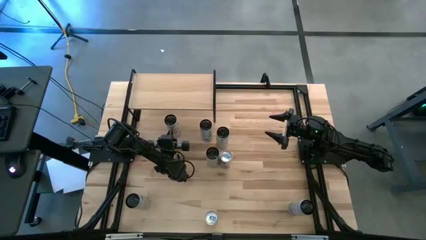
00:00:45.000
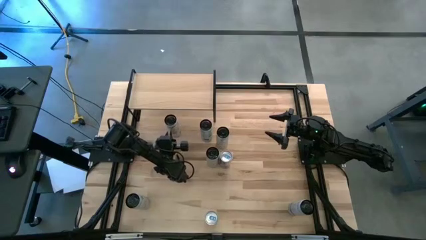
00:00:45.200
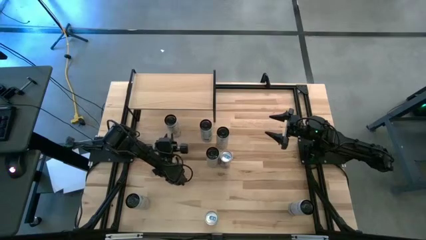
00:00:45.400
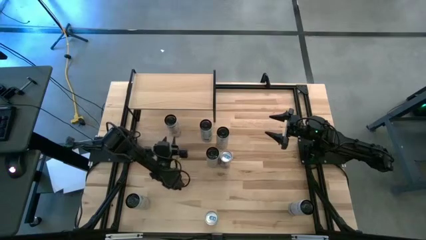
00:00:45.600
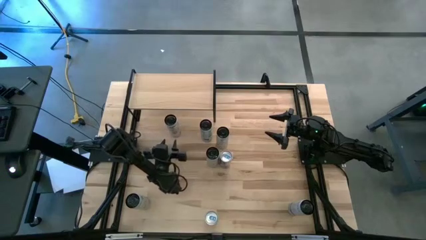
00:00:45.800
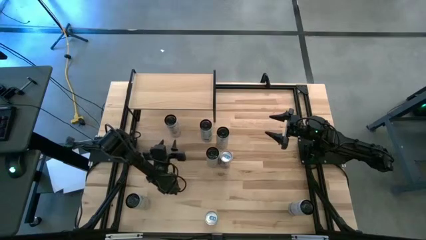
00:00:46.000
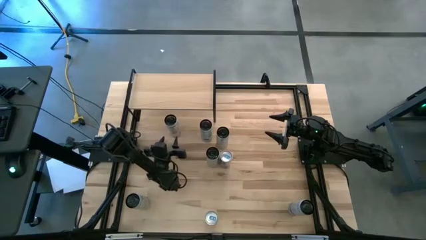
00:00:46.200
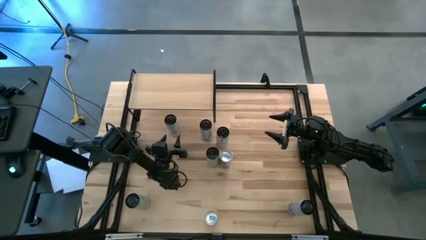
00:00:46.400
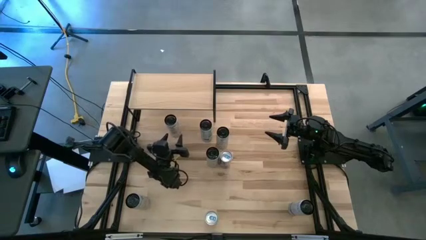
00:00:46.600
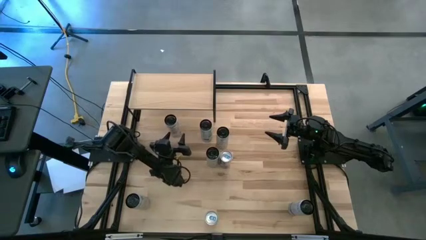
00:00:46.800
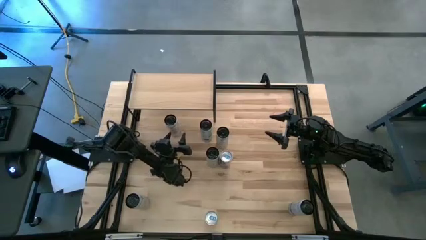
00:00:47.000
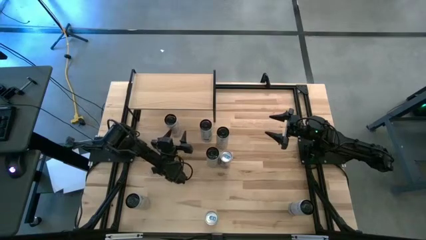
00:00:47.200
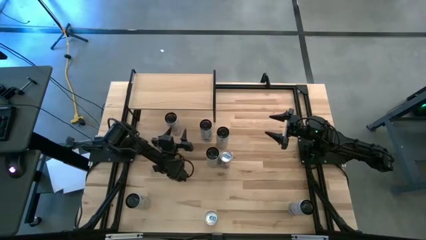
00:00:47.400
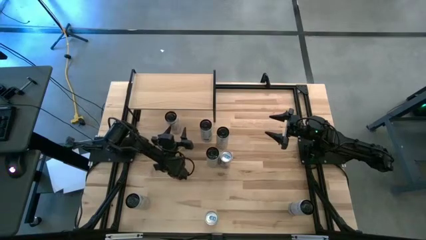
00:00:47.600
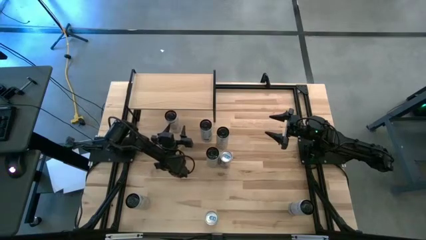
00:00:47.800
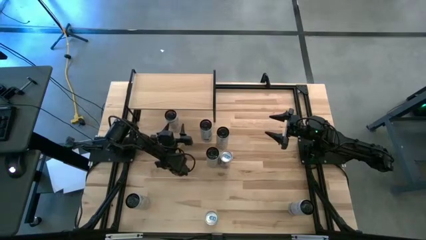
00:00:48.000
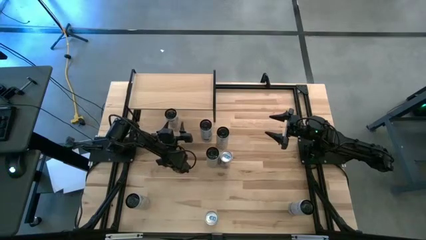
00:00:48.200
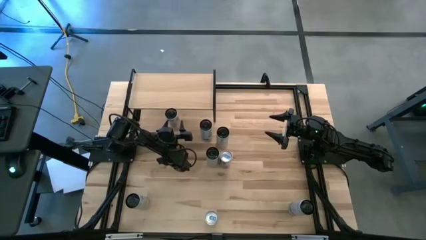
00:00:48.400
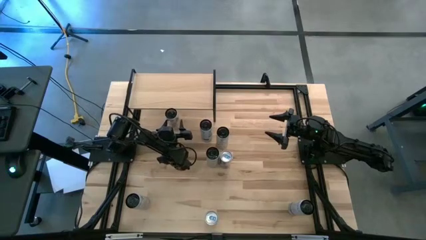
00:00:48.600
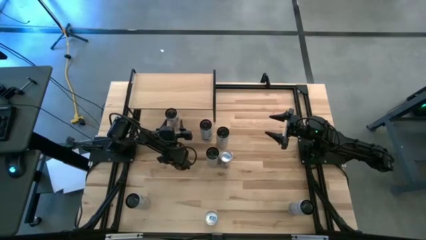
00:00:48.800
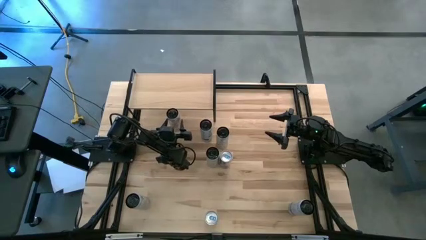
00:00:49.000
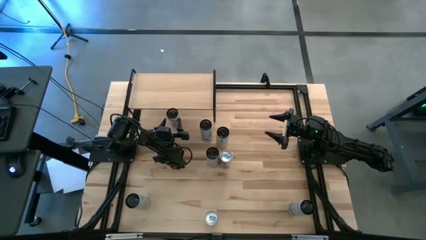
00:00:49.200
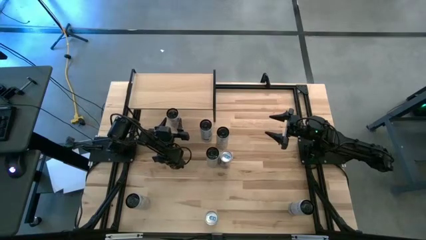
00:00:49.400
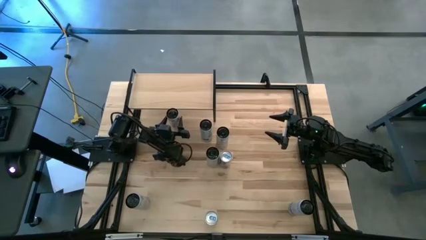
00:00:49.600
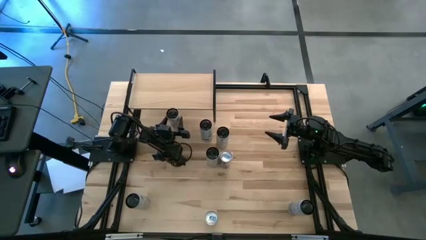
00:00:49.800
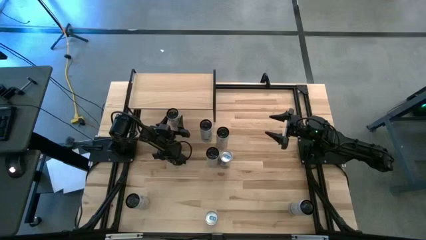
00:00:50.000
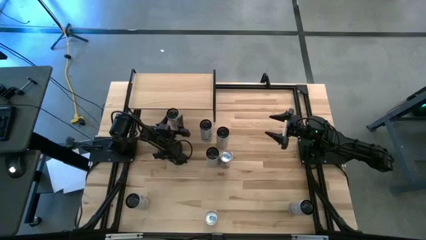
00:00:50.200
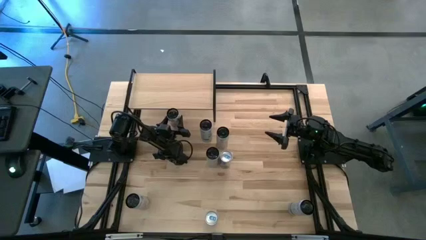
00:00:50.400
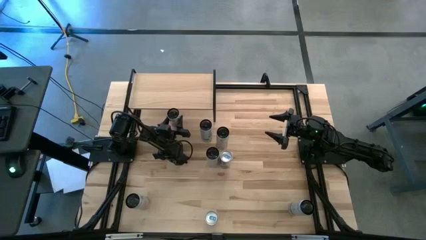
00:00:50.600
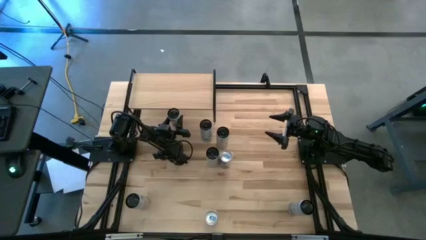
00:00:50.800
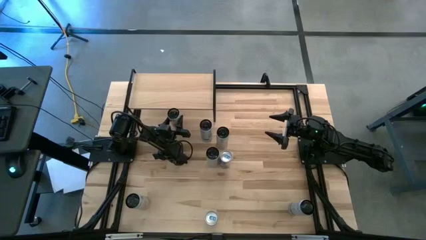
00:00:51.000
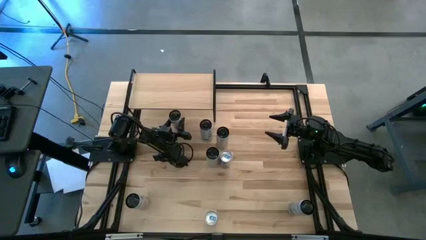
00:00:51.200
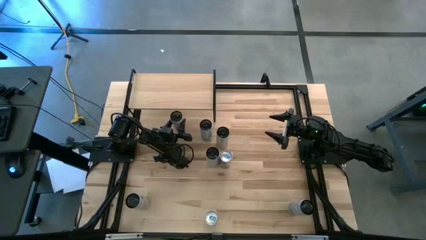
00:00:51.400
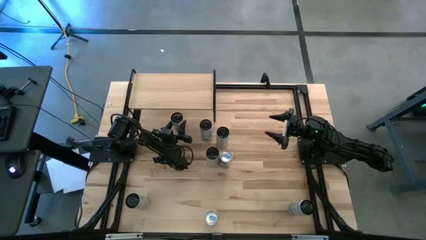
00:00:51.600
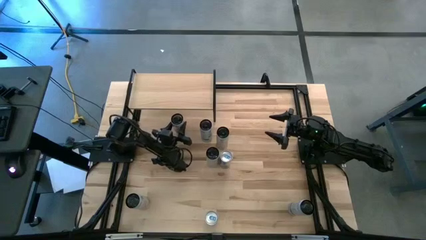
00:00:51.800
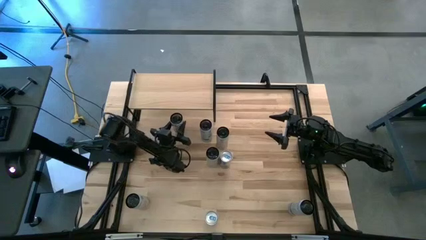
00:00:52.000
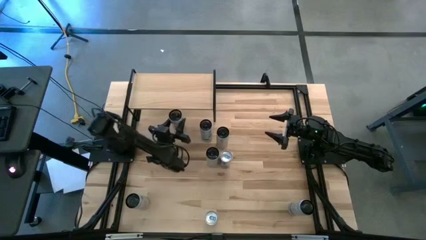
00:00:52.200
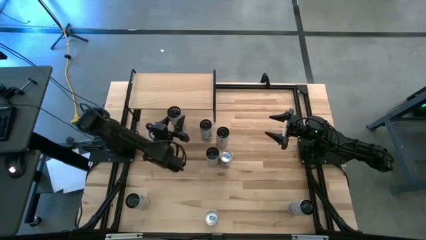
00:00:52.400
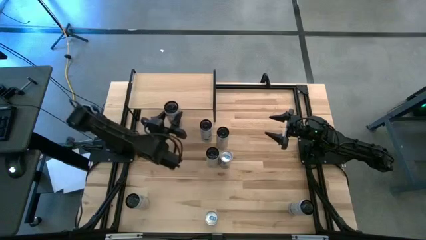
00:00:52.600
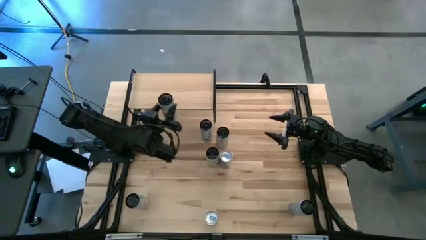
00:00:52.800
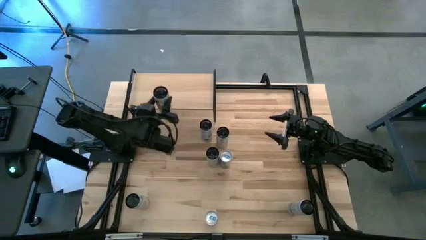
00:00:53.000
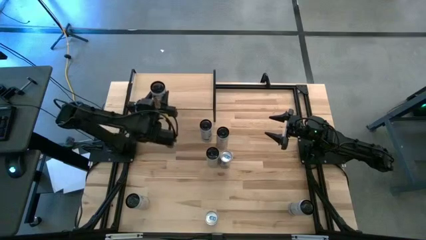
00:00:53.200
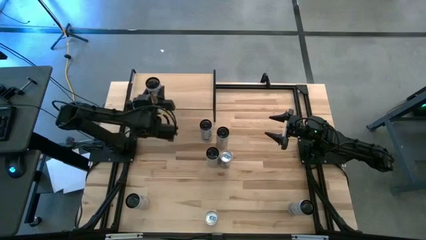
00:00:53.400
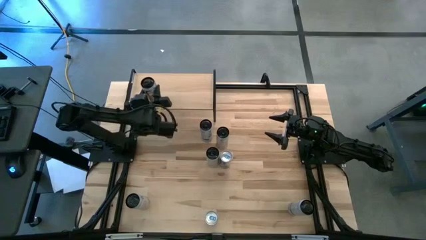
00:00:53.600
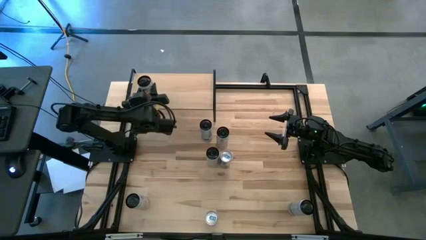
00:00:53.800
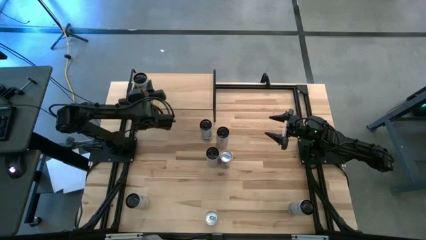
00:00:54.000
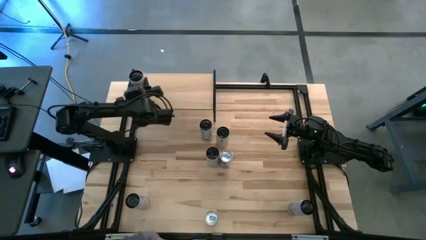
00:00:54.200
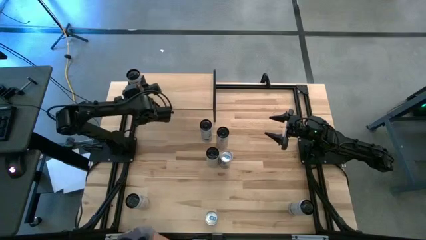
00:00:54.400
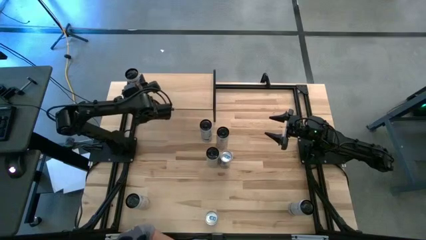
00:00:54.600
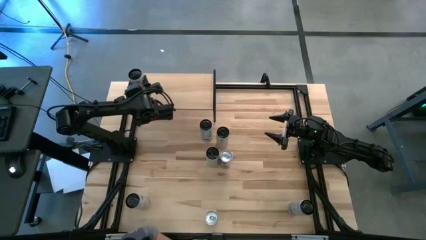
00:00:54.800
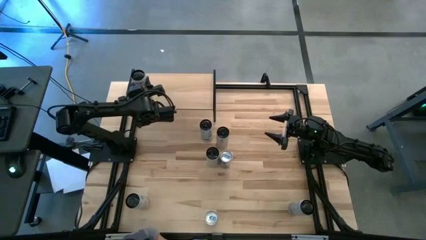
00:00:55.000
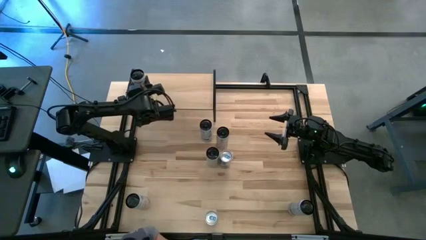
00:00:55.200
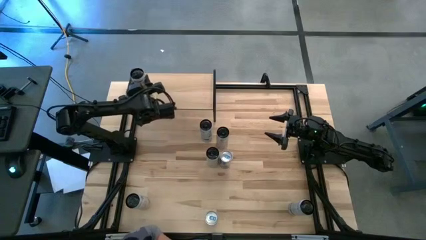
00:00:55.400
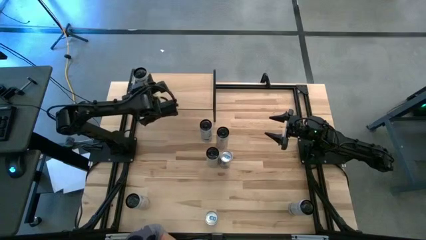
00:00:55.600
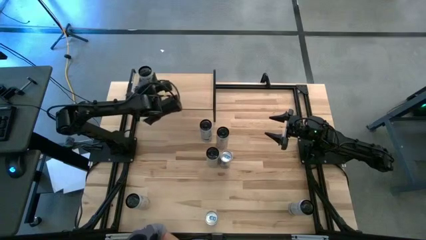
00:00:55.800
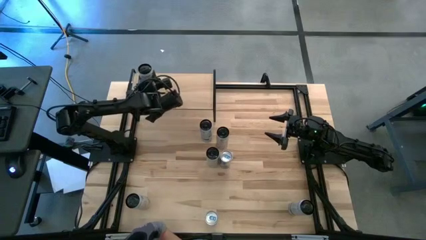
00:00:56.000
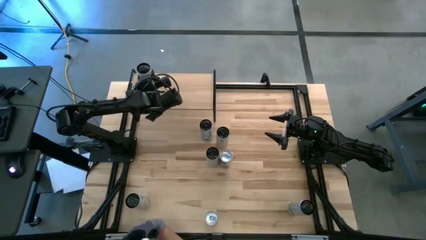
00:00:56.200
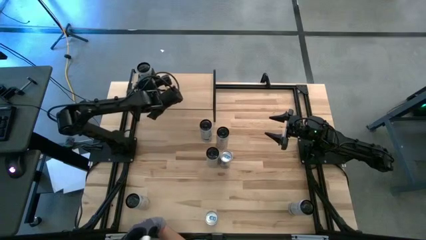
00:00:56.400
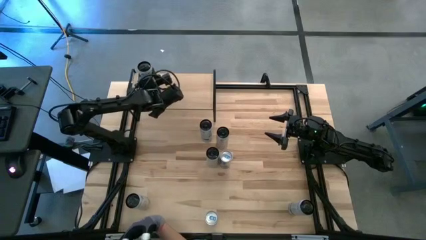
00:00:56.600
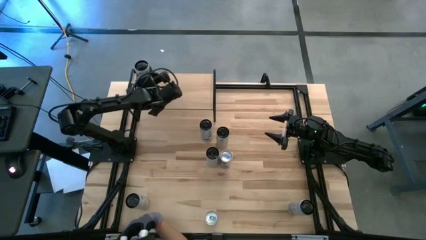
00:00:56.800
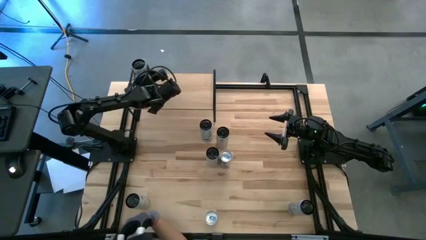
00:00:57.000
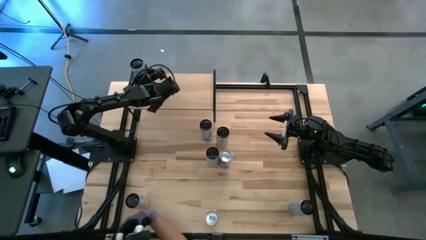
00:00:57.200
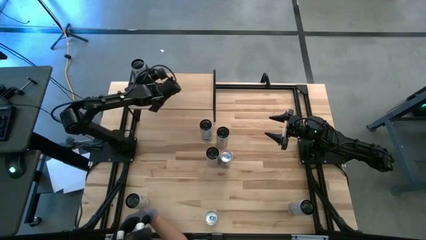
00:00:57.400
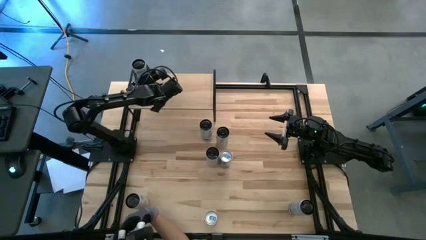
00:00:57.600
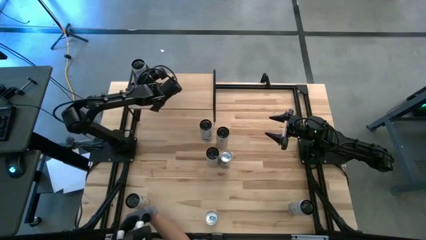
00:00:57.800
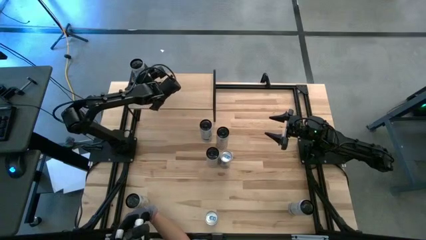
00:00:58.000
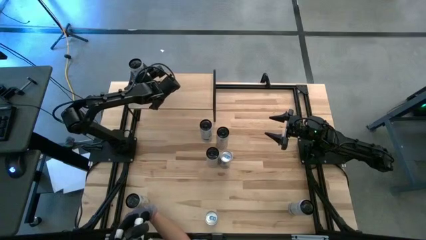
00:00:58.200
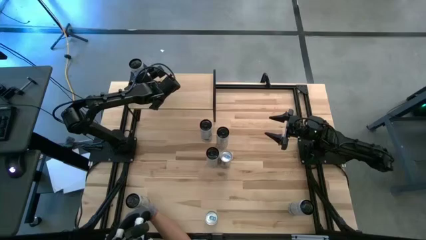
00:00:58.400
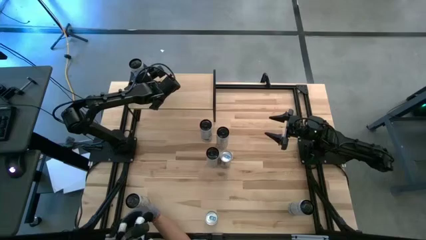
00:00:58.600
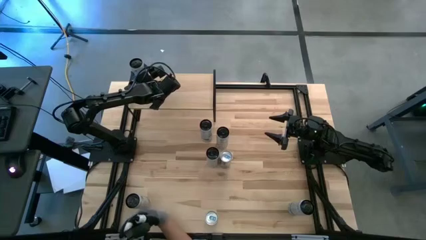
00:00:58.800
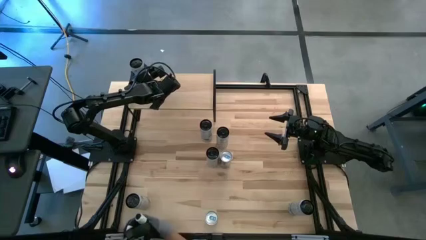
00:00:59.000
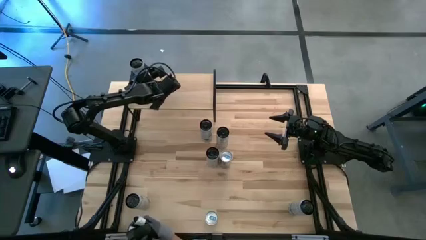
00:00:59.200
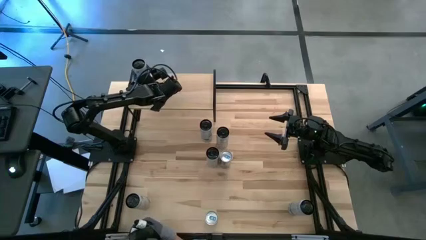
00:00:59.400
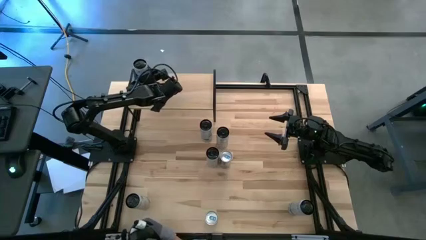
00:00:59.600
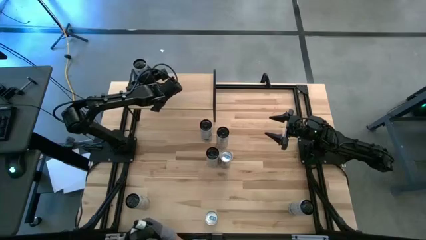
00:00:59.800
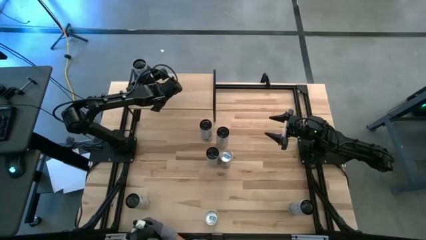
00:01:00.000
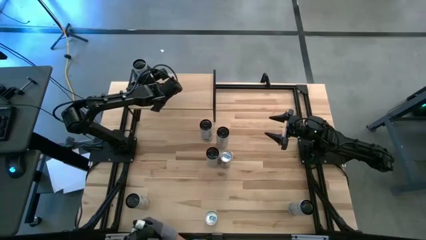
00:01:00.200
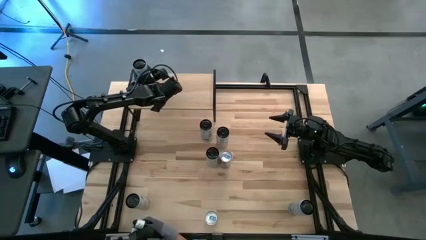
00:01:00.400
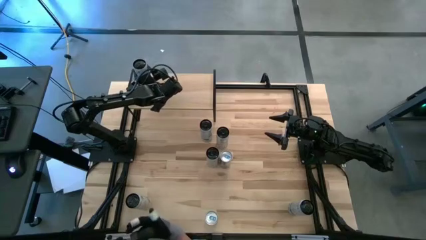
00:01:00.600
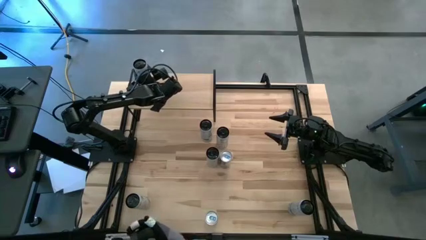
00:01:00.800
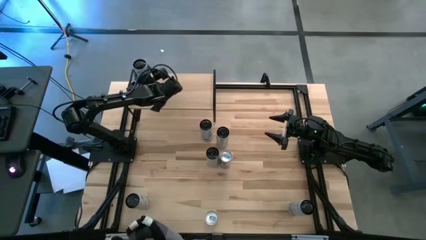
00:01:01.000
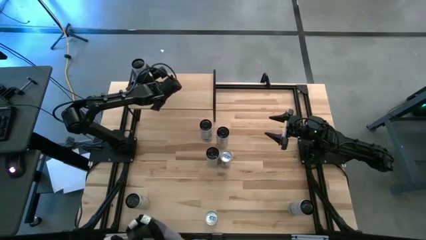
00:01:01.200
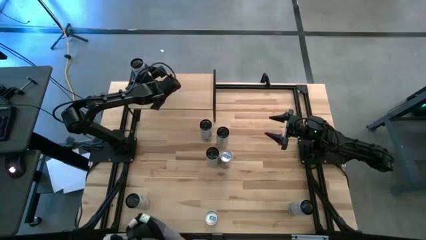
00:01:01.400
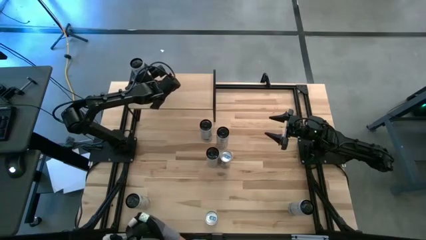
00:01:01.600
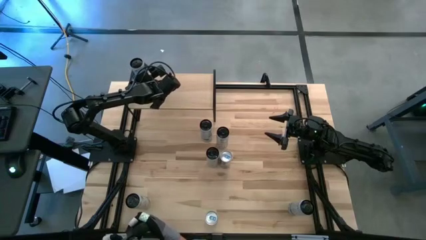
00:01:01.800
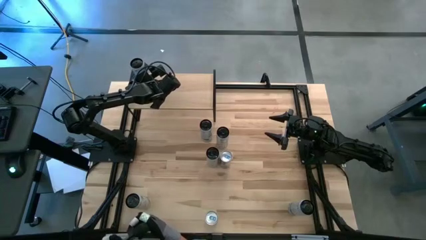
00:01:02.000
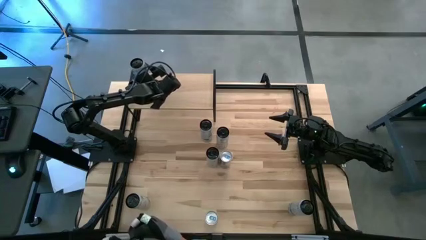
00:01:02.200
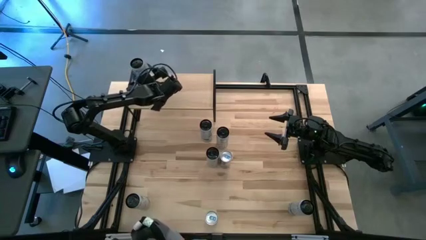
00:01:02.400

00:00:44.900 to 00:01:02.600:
Task: Place canned beverage on shelf
Put the top white pink soda can on the shelf
